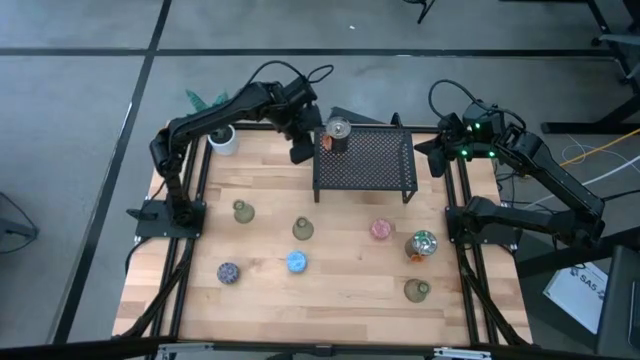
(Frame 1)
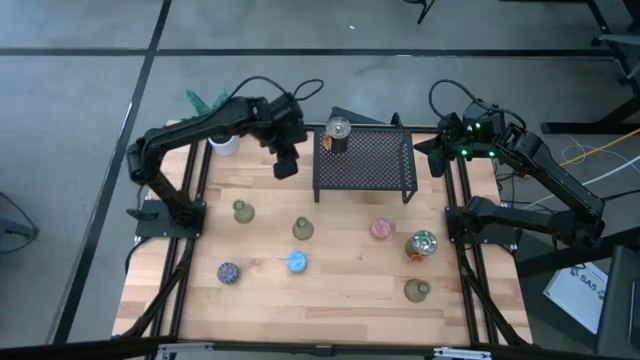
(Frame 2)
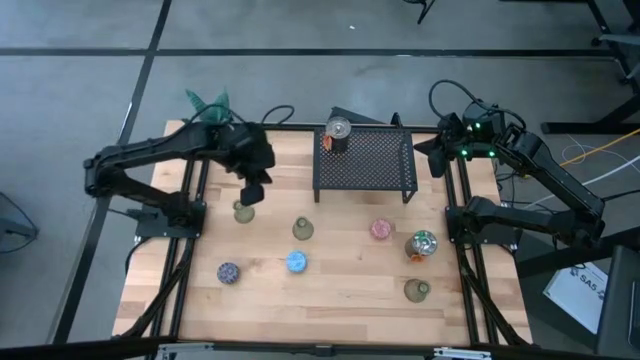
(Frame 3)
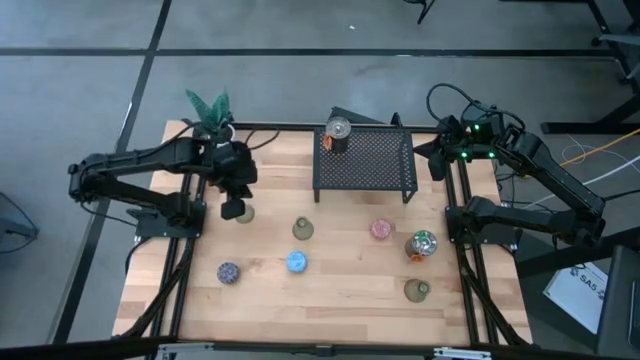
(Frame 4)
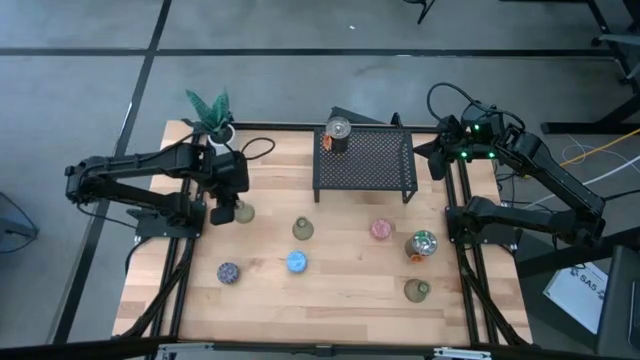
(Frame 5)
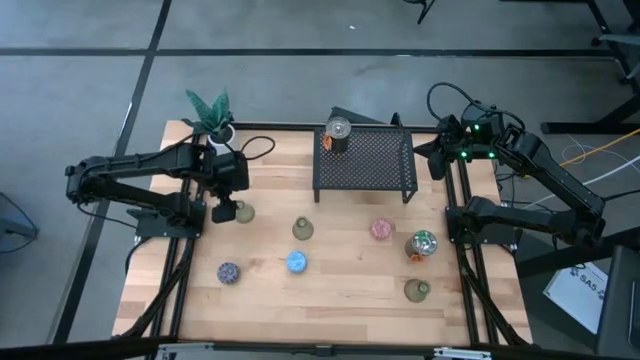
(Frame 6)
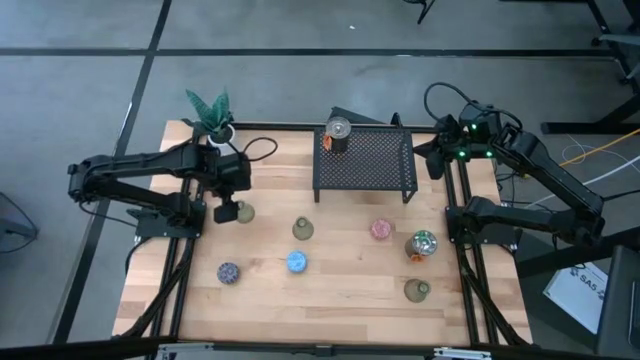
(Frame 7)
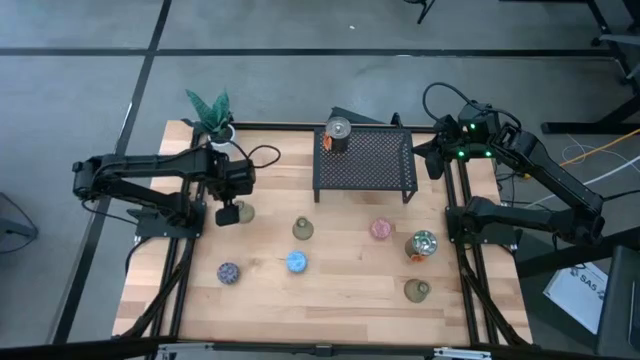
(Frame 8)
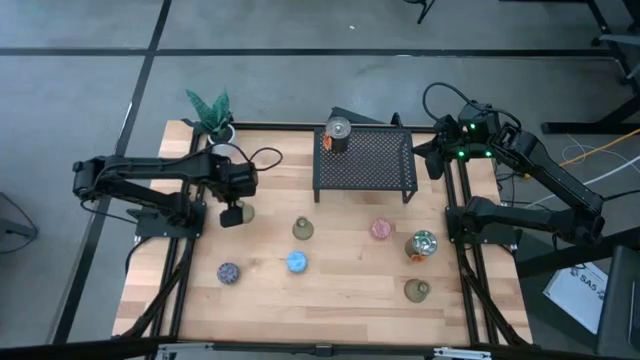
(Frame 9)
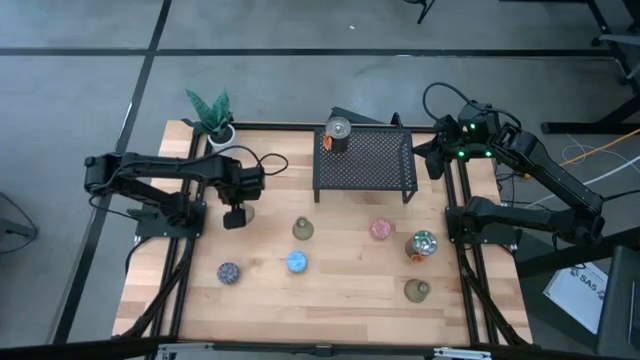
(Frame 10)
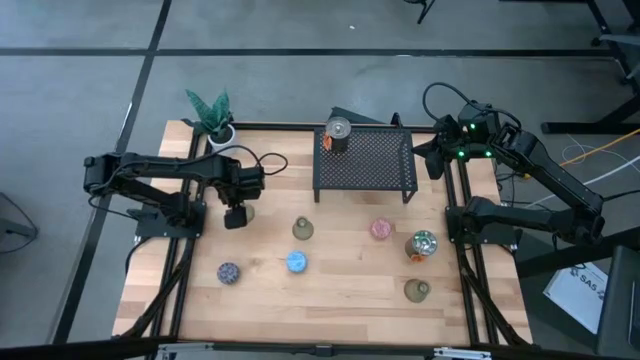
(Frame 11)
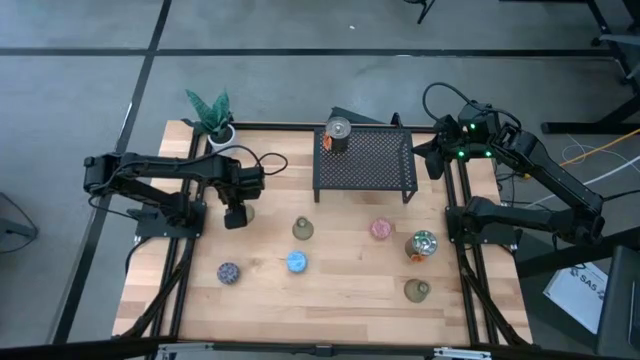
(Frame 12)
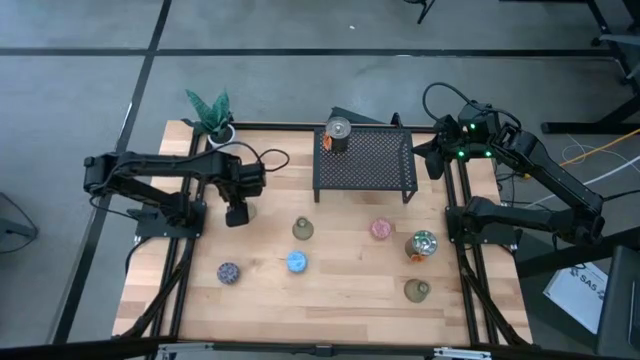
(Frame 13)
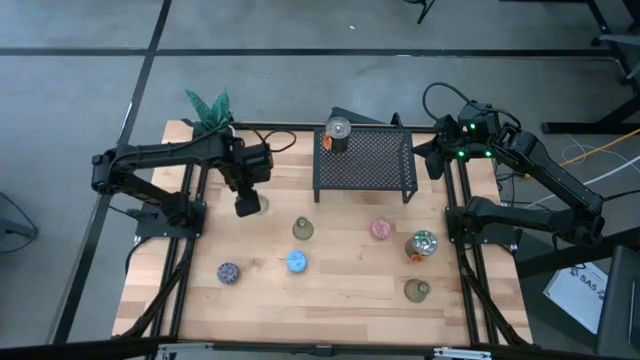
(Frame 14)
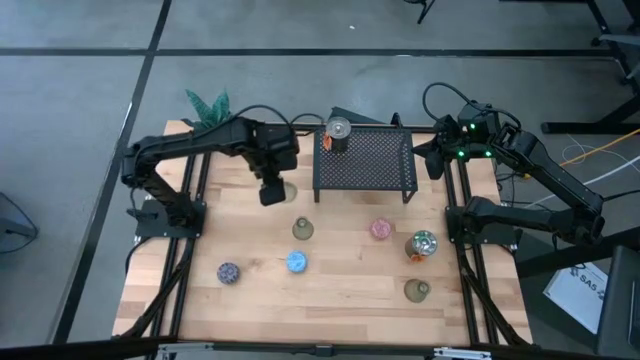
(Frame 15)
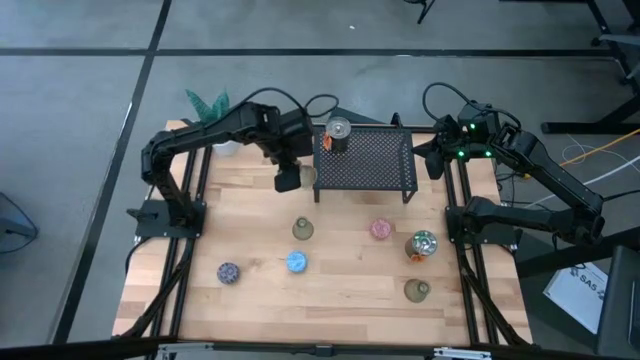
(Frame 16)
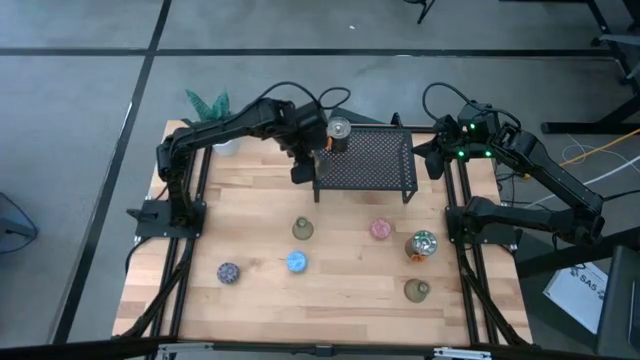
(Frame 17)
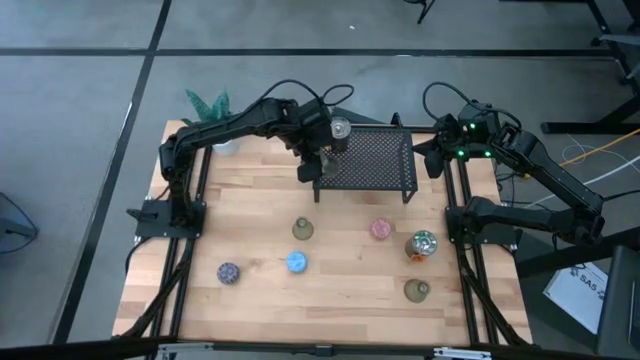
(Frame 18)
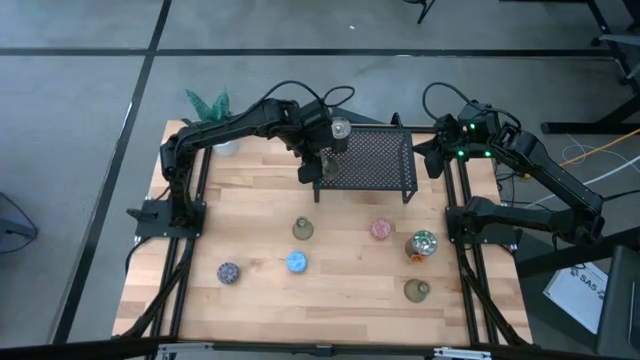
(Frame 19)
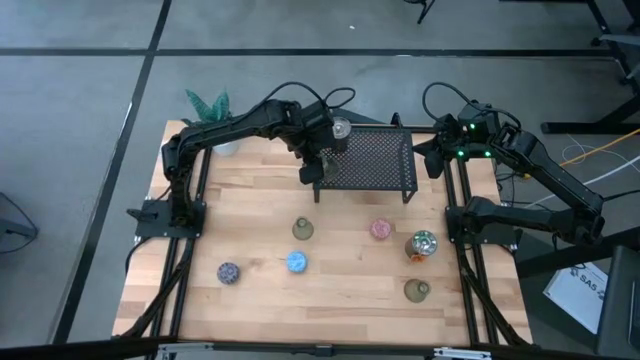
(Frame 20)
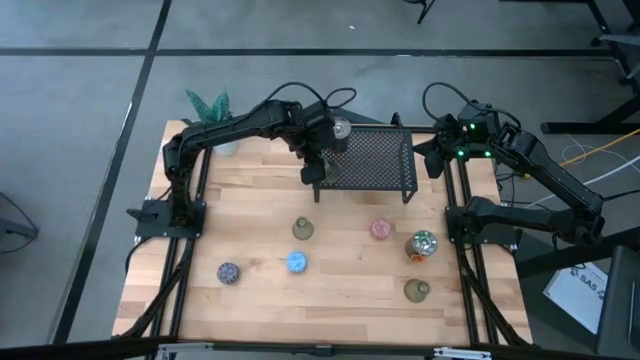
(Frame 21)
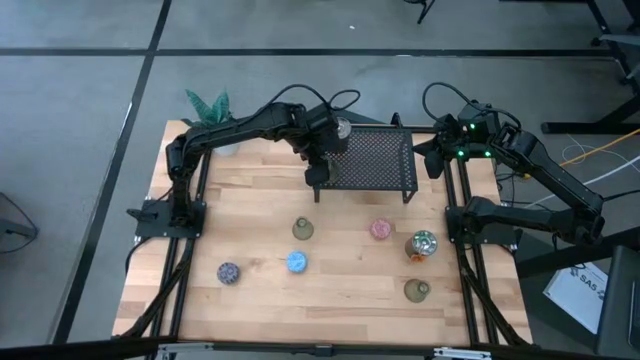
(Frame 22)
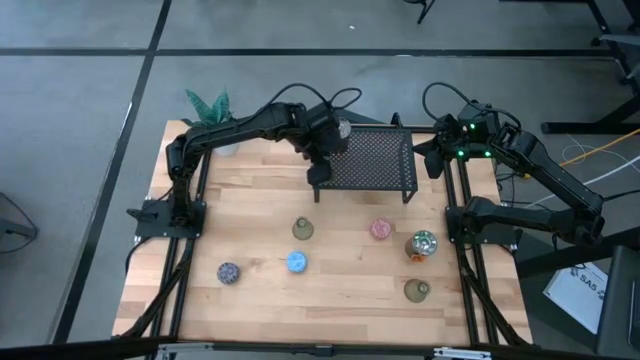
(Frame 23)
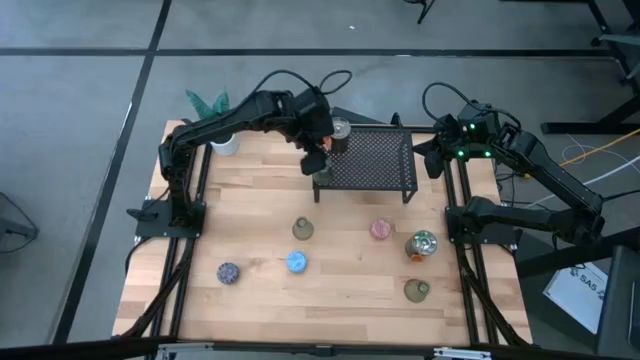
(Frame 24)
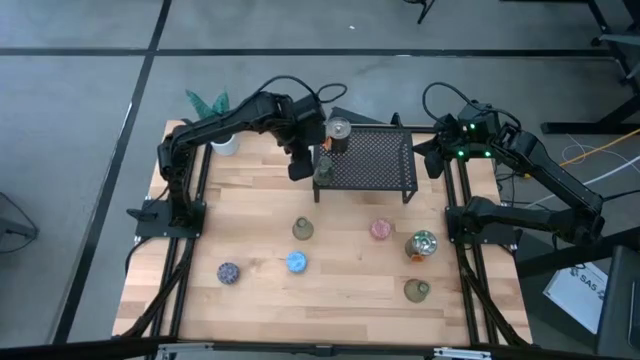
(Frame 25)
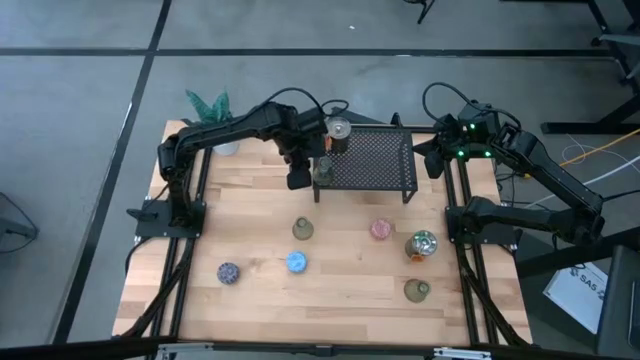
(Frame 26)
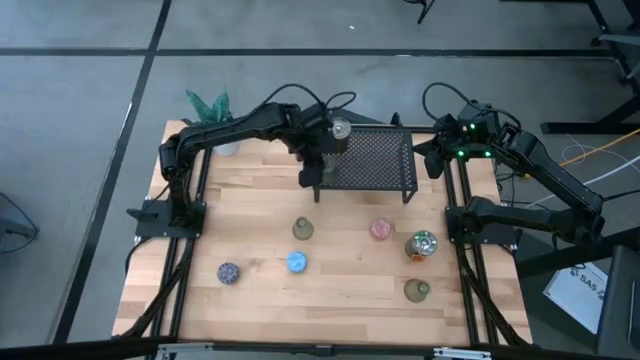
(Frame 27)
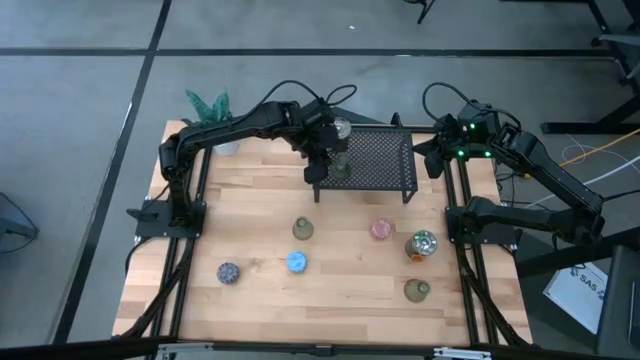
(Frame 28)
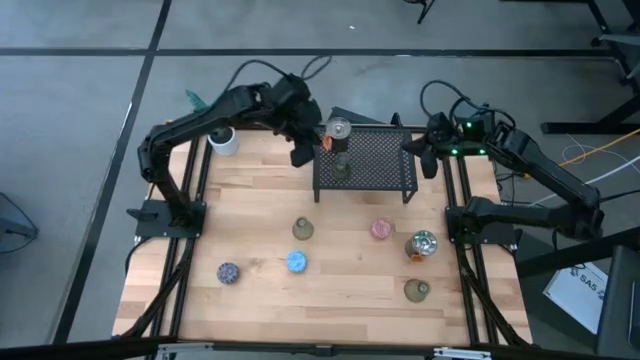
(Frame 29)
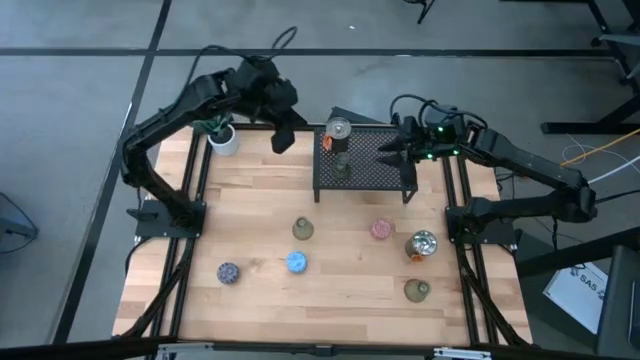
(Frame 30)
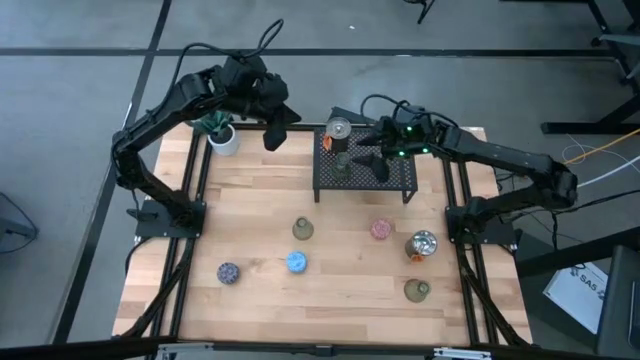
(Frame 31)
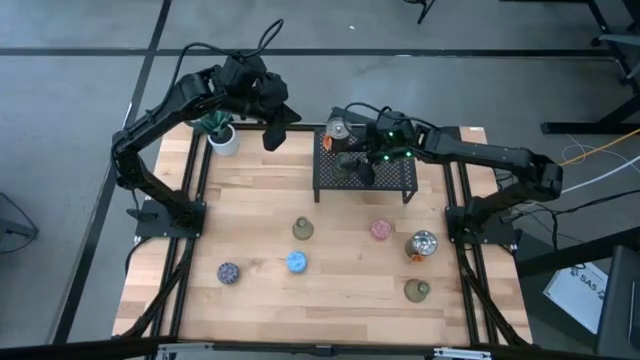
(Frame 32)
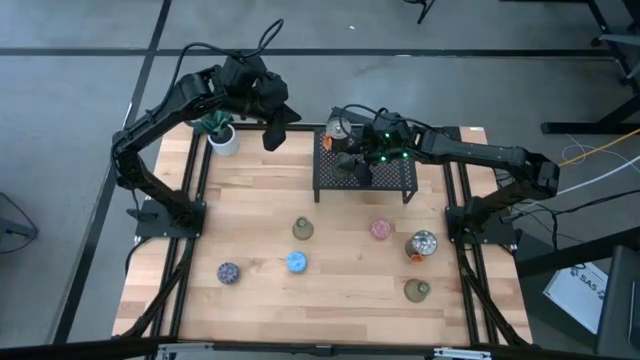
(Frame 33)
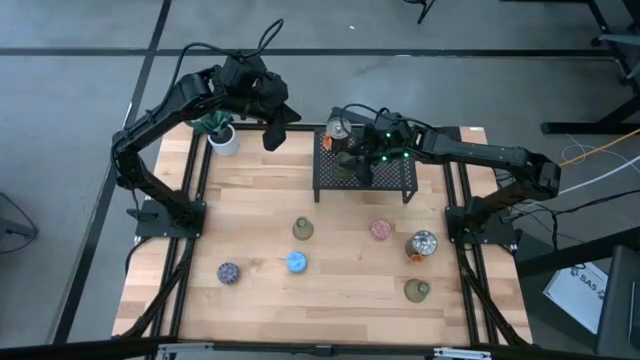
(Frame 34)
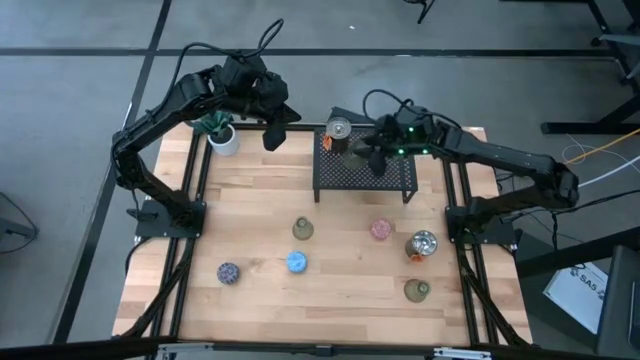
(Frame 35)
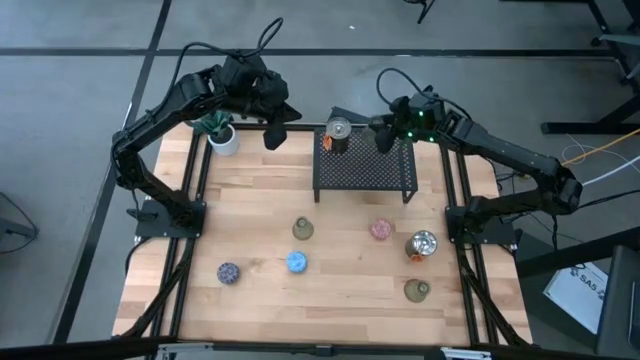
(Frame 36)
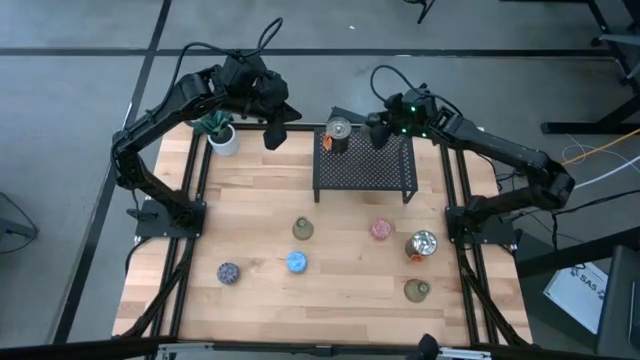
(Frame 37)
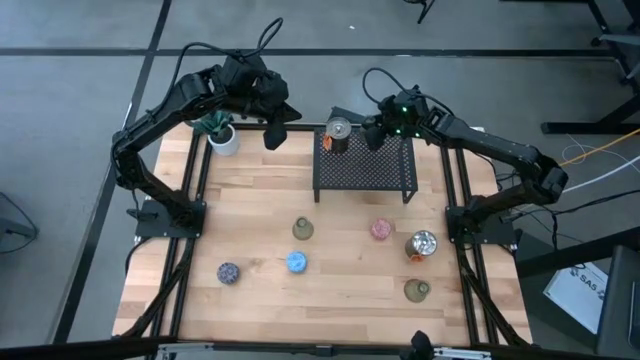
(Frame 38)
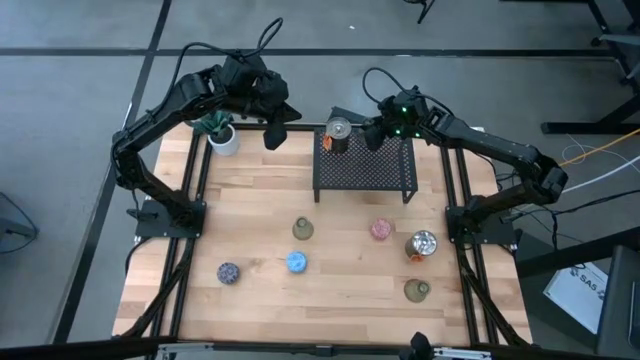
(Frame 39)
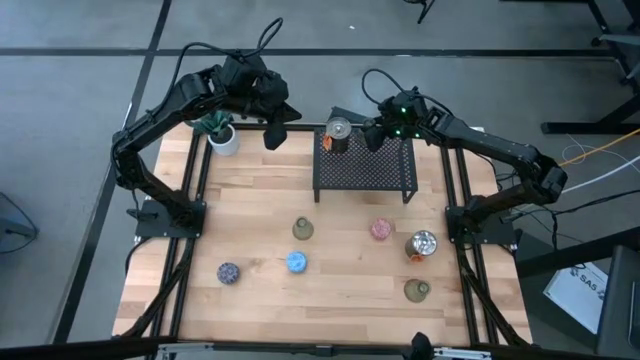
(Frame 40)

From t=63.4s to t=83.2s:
Task: Pick & Place candle stick holders
Put the left green vase candle holder on the shelf

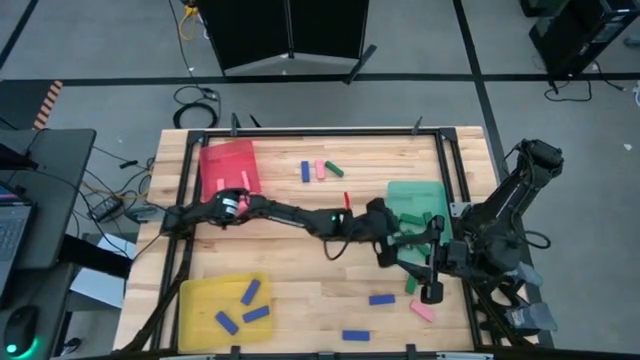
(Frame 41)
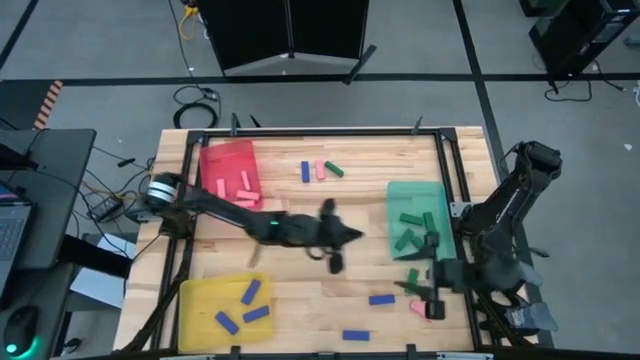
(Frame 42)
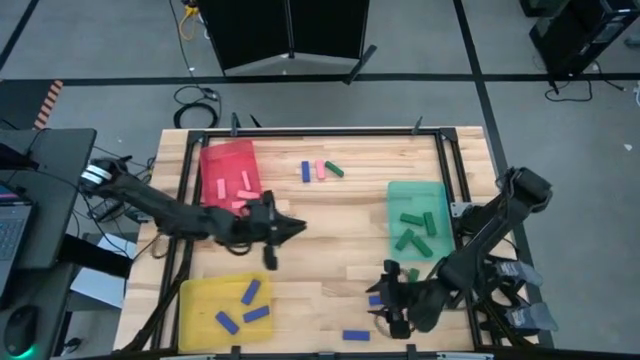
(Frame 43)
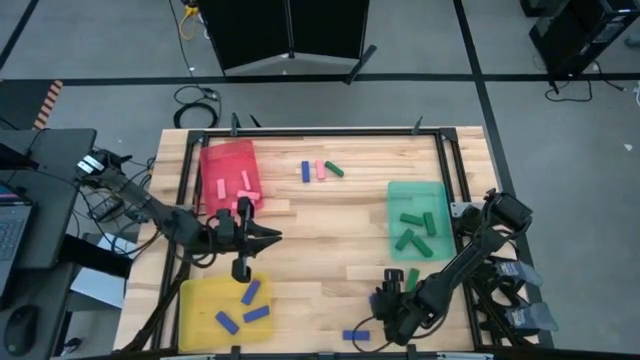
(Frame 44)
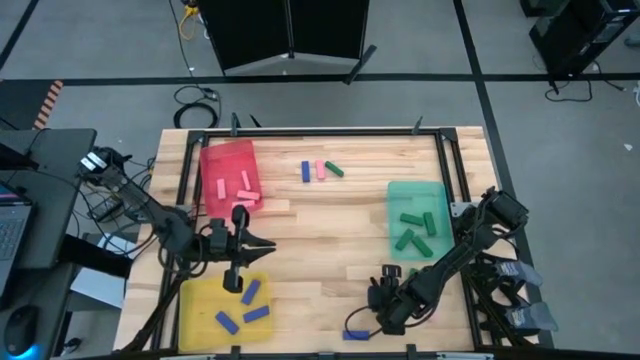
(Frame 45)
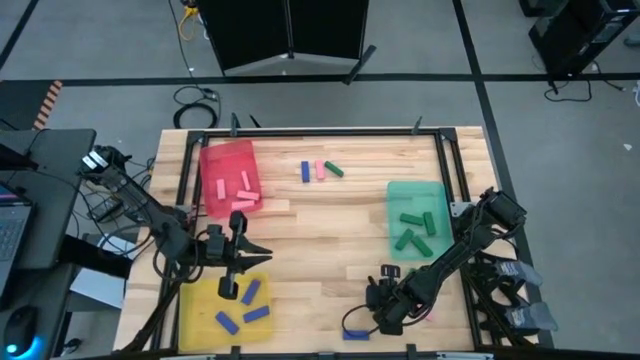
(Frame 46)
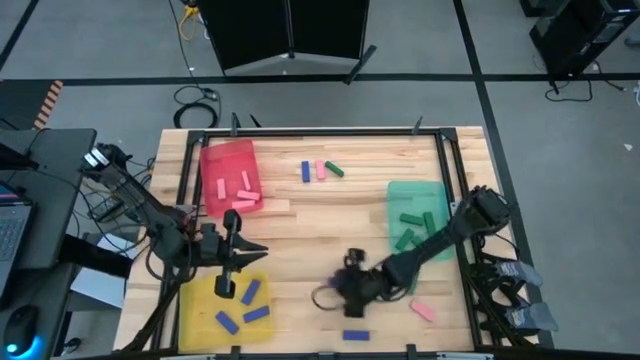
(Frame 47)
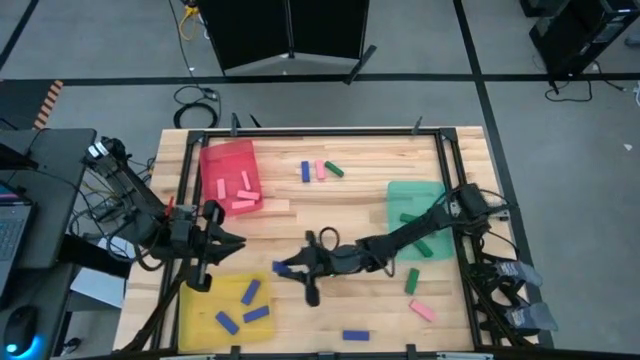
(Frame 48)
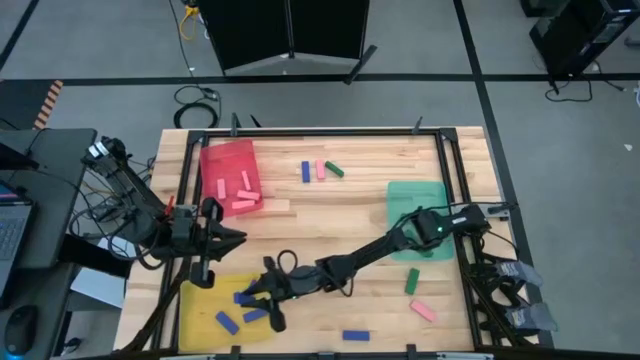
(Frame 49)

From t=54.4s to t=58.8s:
Task: Sort blocks
Put the blue block into the yellow bin
